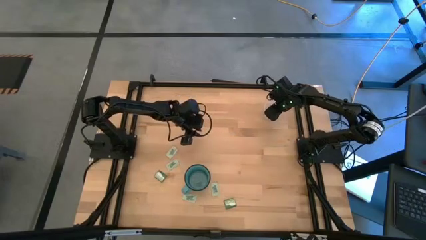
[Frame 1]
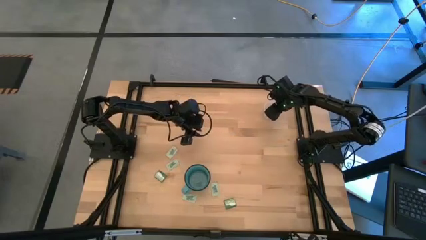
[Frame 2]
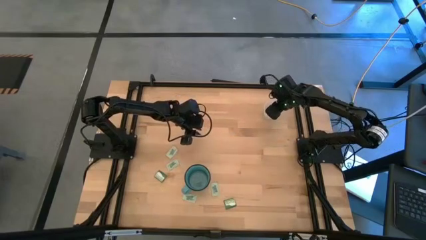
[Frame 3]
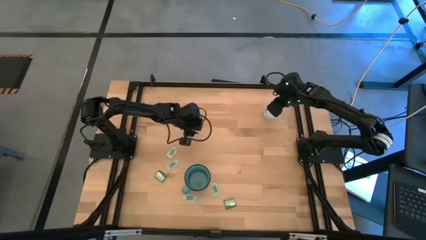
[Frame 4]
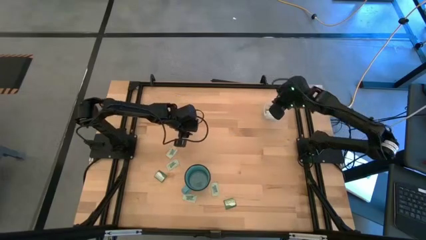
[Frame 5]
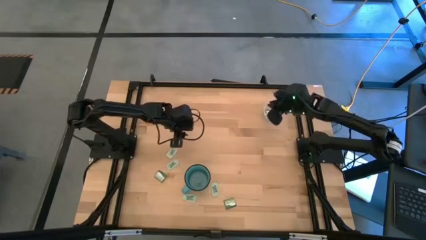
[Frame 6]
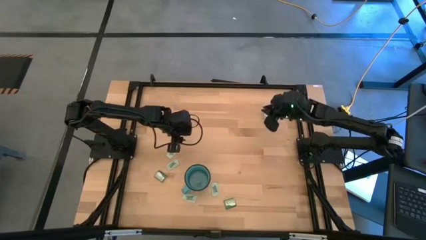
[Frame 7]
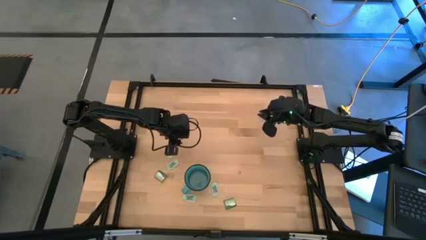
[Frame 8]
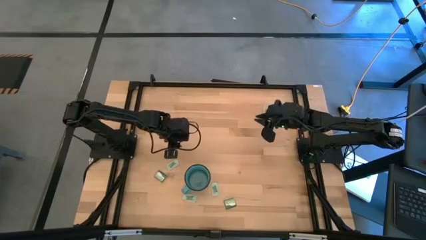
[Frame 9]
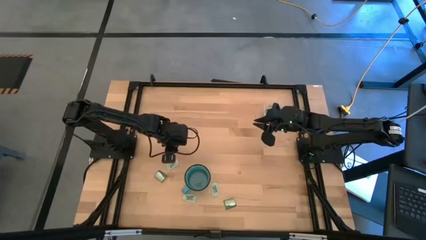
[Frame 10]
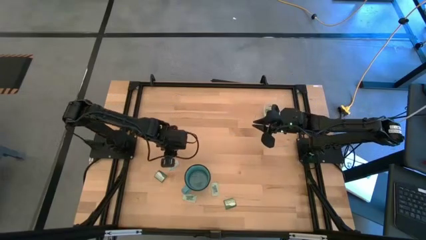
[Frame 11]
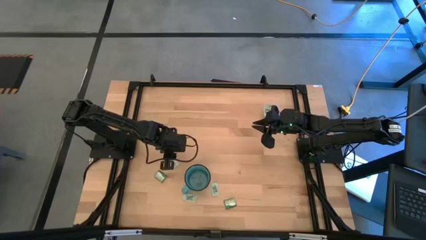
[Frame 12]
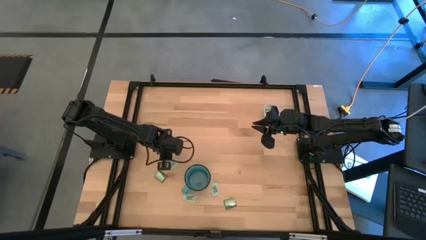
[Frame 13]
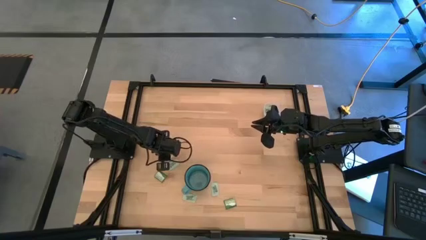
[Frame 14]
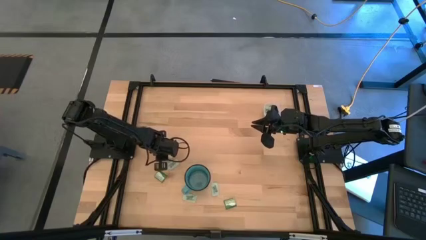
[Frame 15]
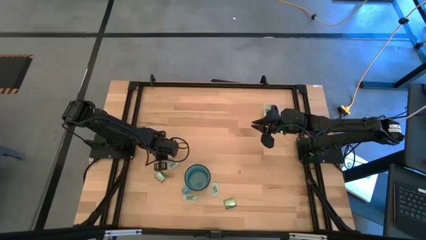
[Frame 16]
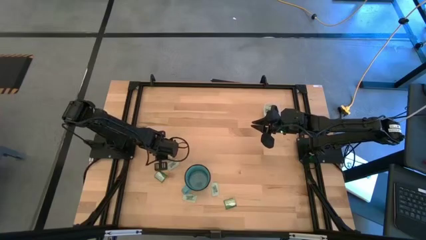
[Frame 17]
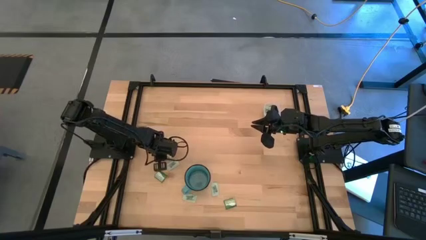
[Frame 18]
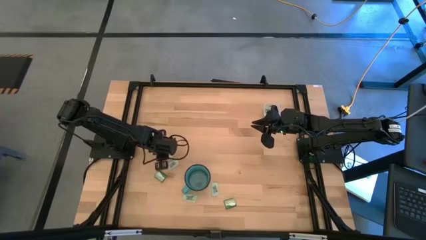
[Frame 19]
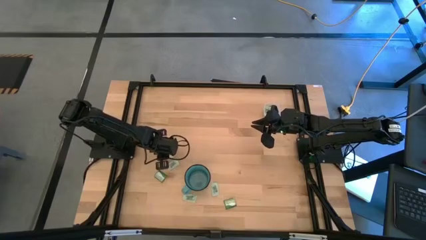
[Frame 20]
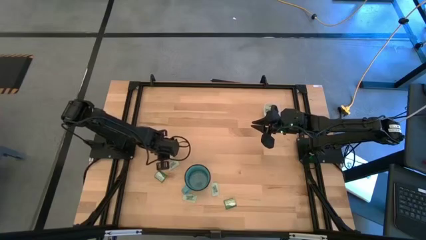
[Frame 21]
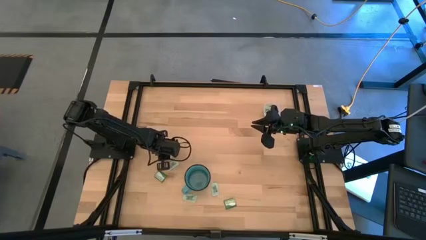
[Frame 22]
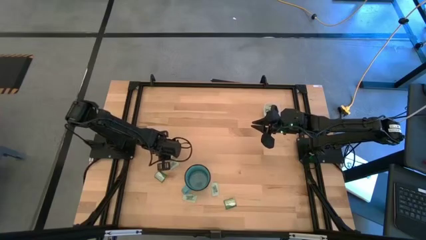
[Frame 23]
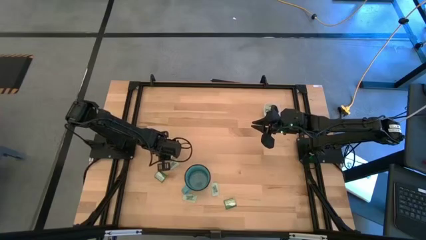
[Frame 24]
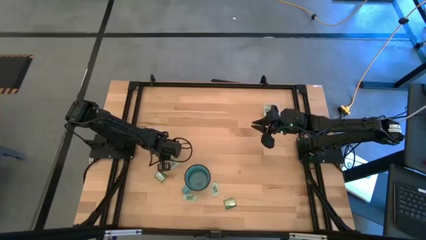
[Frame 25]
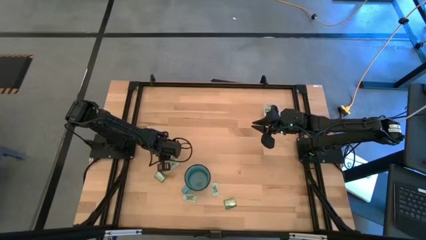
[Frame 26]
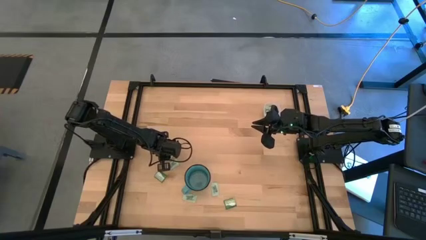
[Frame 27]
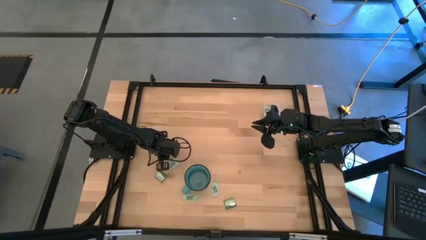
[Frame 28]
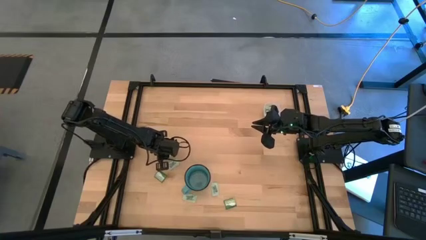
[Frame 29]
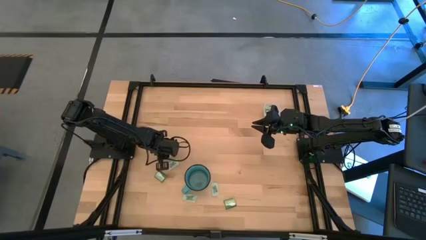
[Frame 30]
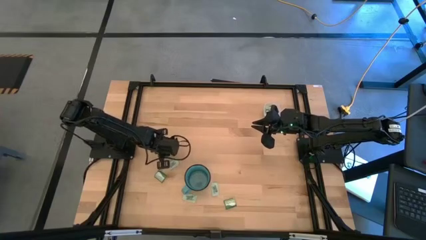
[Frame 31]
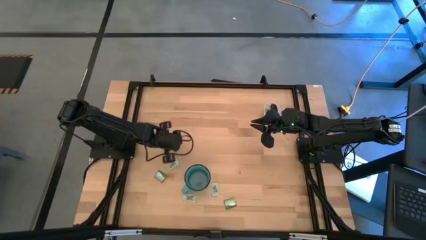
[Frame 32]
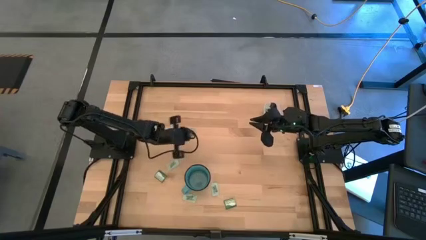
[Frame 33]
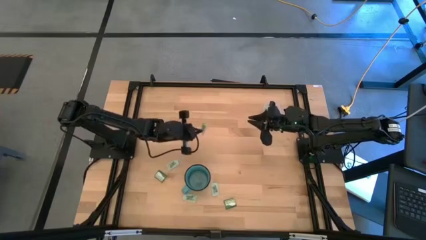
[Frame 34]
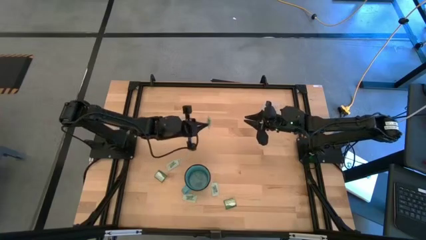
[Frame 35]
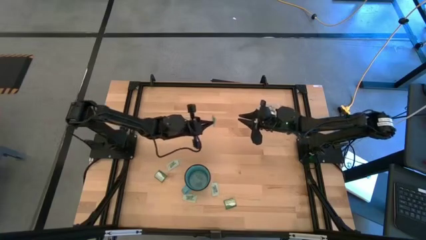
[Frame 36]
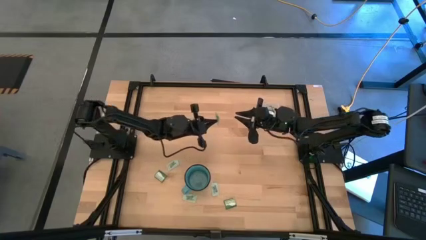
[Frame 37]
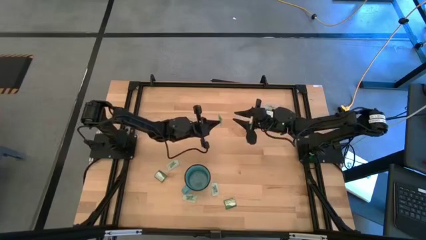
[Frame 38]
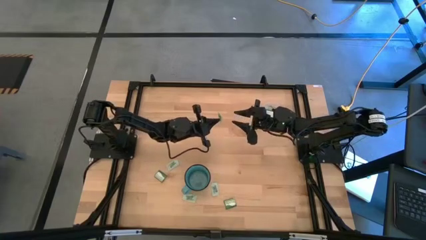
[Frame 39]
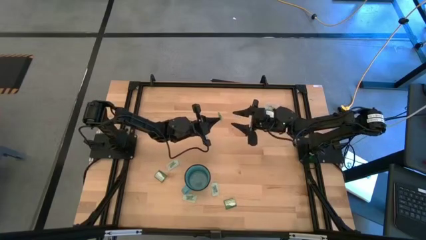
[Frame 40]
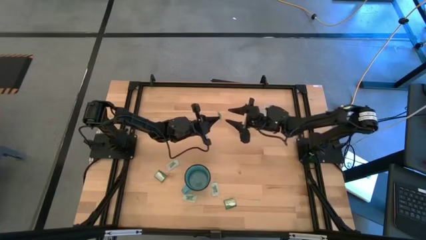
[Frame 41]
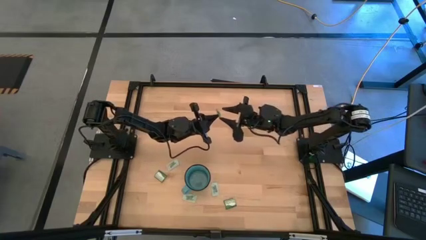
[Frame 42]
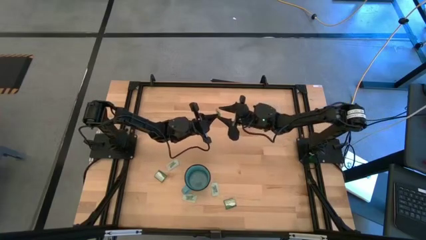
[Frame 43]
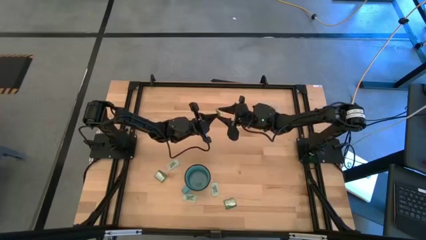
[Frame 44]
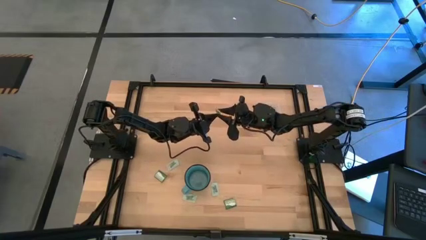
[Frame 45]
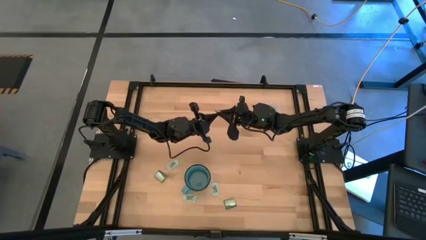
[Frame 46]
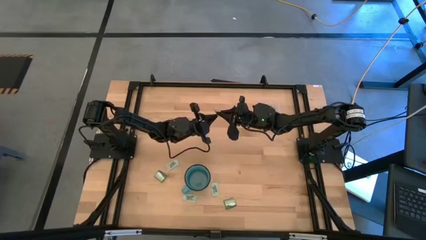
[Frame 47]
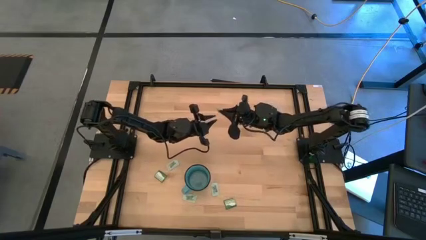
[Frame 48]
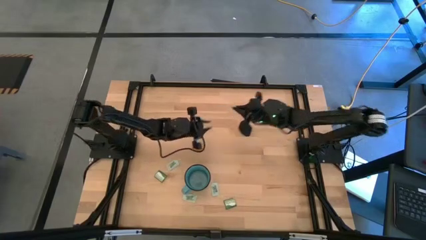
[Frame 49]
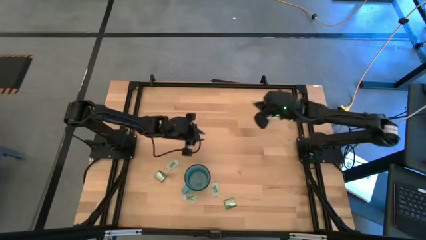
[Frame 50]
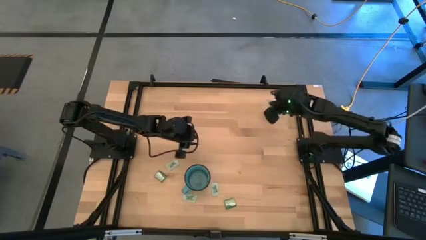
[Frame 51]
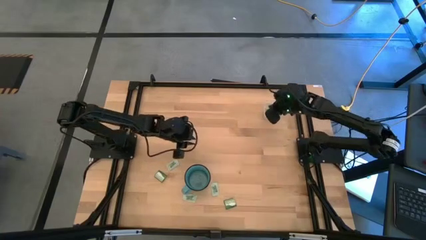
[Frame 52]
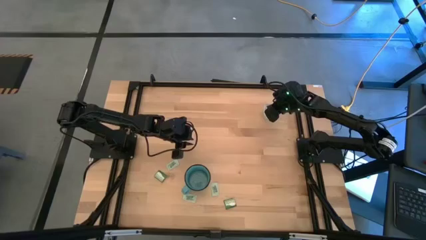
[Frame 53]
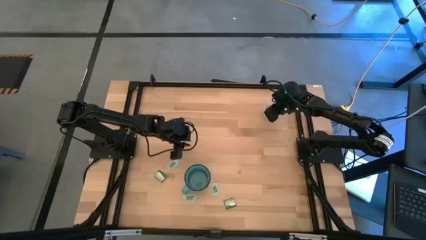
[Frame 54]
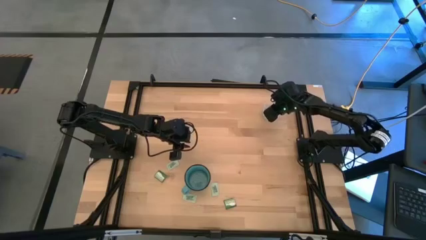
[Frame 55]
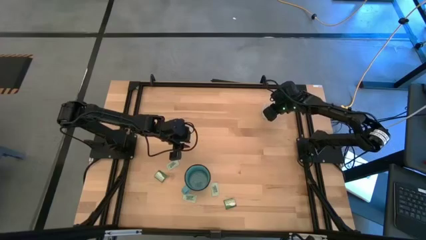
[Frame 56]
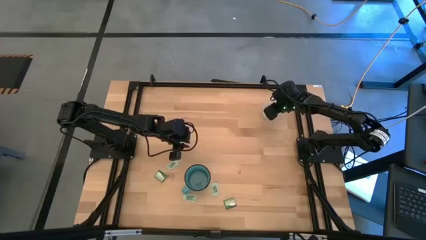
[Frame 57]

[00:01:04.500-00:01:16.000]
Task: Pick and place items into bin
Put the stevia packet into the transparent bin

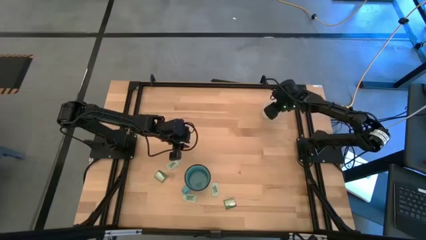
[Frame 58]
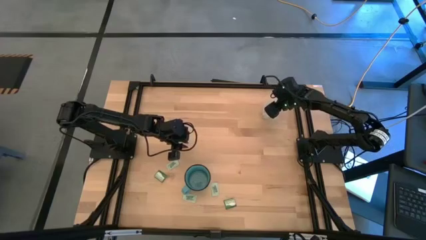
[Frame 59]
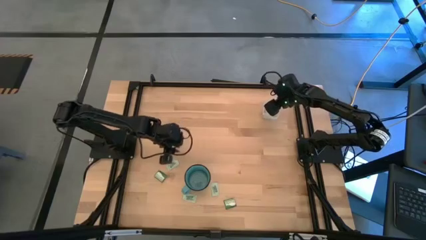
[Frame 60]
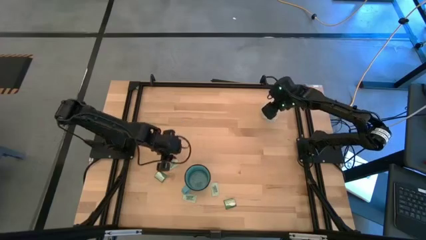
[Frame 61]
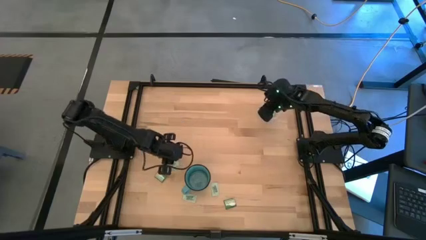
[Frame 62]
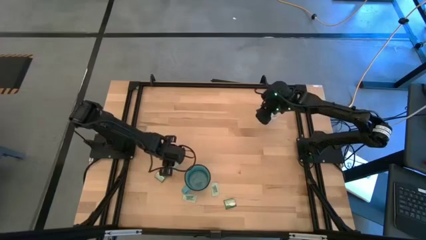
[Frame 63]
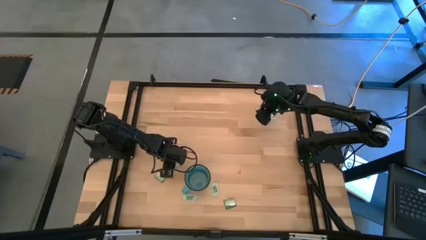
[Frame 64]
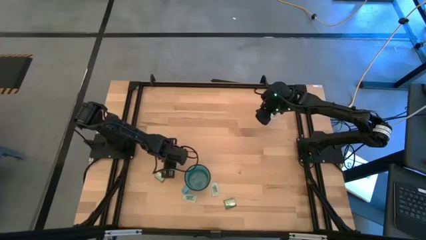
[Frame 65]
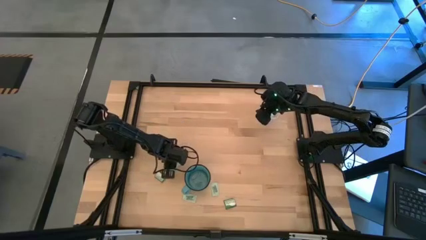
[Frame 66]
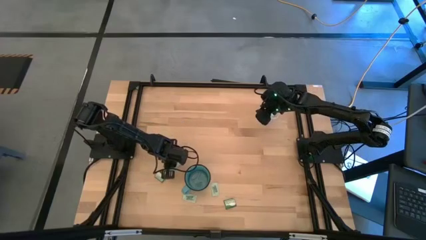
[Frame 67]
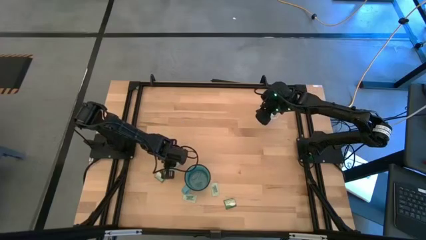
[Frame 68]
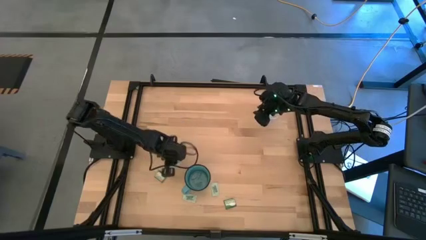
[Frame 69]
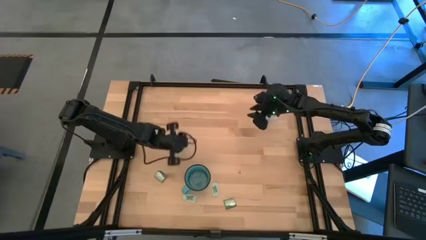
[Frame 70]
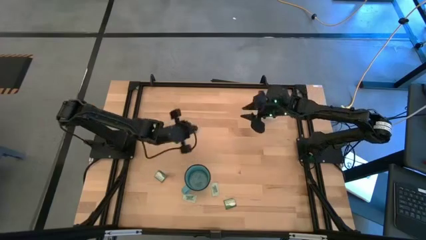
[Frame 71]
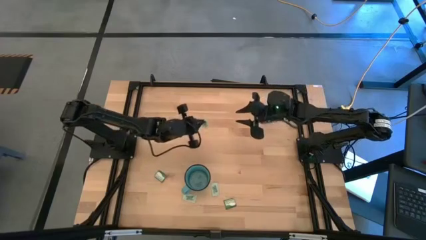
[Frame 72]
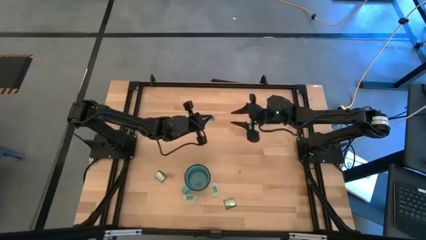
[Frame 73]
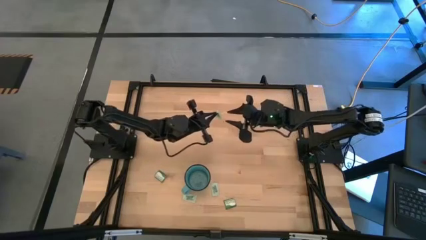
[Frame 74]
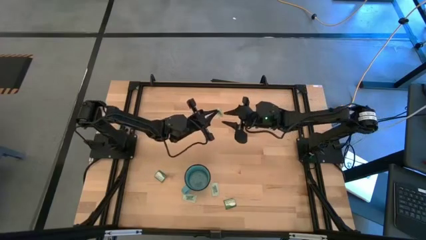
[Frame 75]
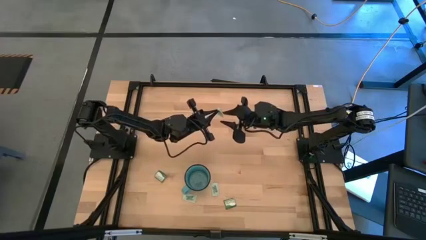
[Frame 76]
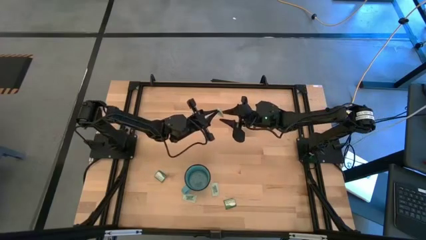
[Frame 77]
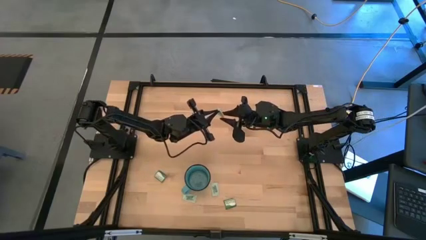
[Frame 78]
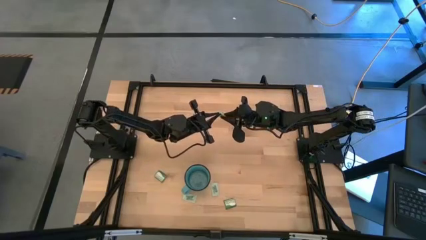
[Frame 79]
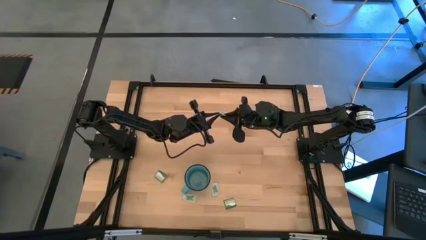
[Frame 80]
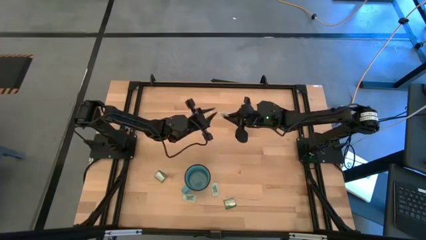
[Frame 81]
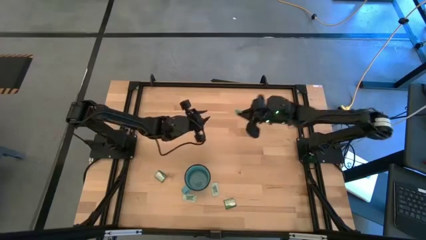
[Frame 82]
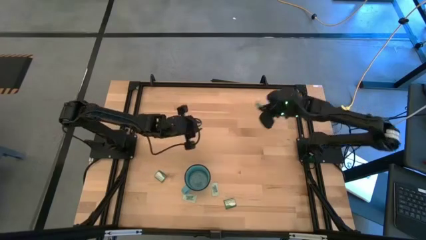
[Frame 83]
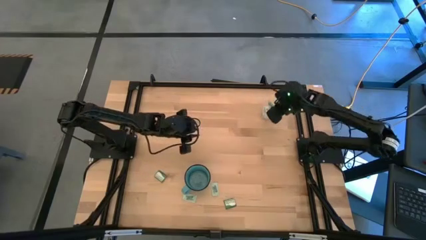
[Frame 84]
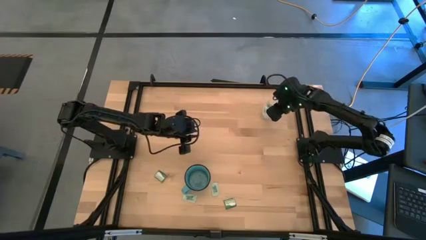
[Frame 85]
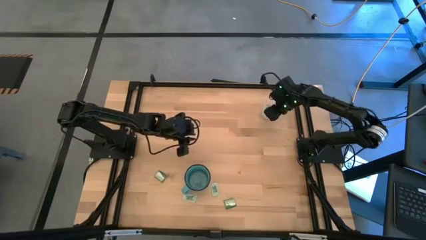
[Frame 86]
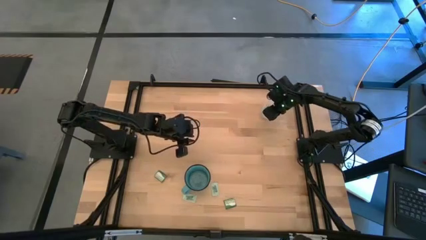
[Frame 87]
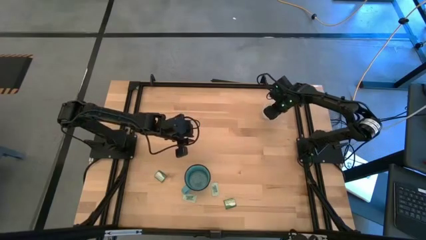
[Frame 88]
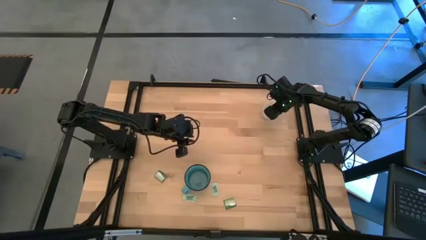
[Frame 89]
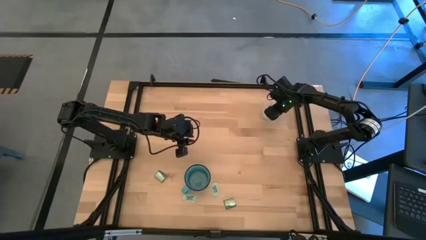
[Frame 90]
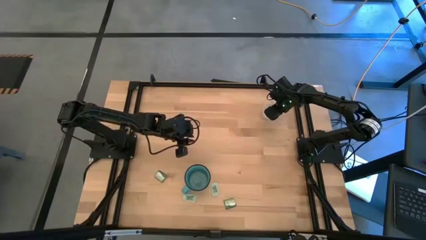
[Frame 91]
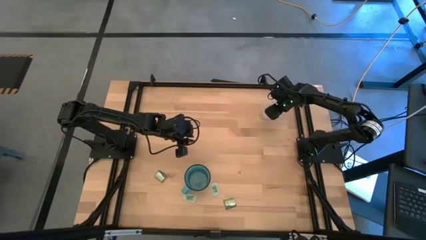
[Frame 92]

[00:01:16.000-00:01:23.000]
Put the stevia packet into the transparent bin
